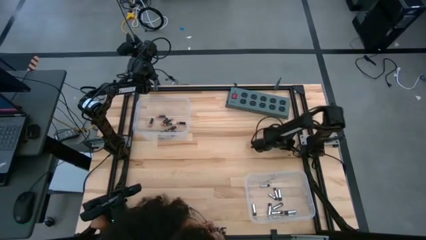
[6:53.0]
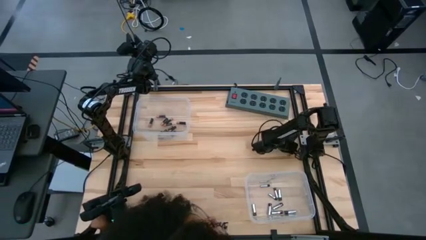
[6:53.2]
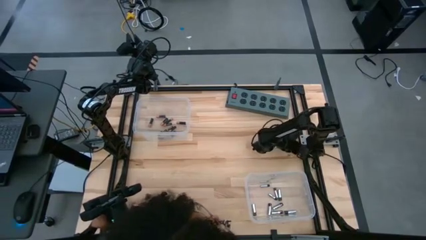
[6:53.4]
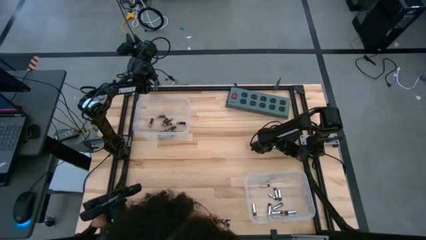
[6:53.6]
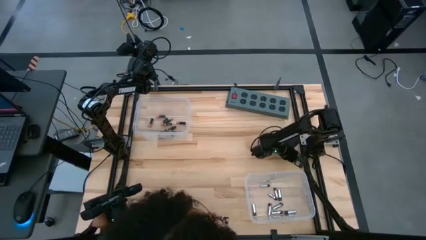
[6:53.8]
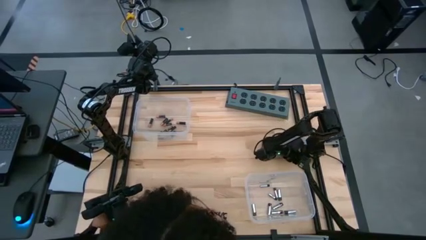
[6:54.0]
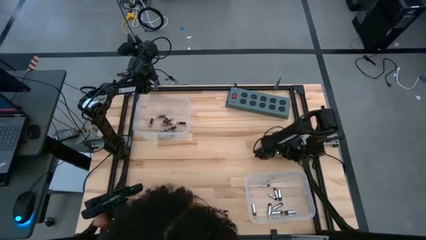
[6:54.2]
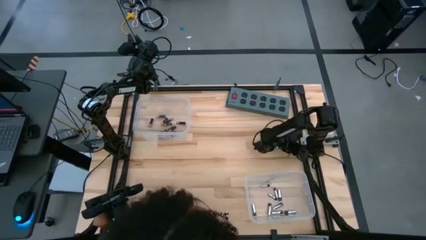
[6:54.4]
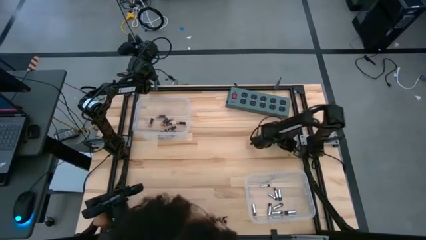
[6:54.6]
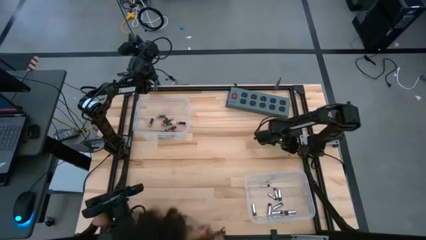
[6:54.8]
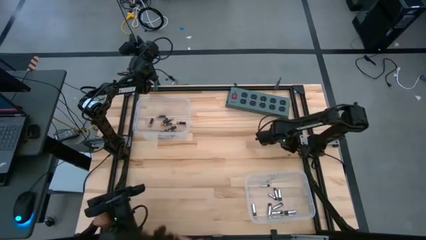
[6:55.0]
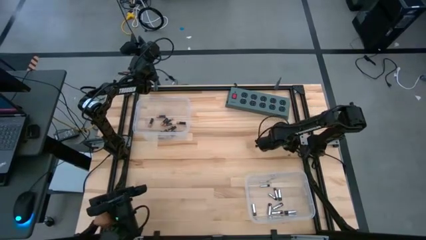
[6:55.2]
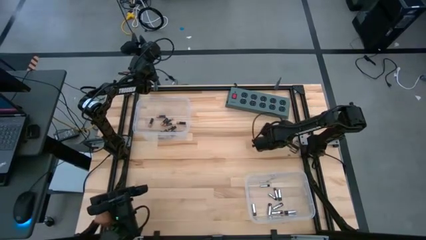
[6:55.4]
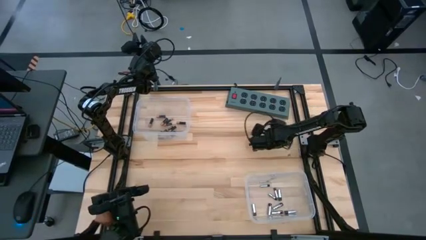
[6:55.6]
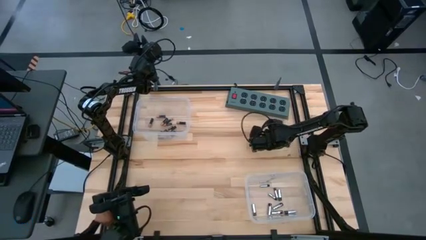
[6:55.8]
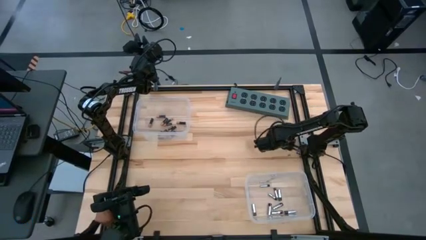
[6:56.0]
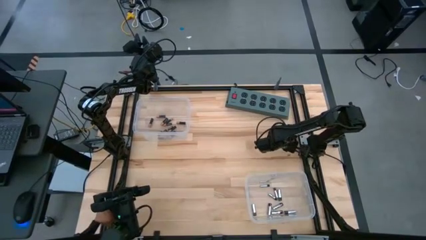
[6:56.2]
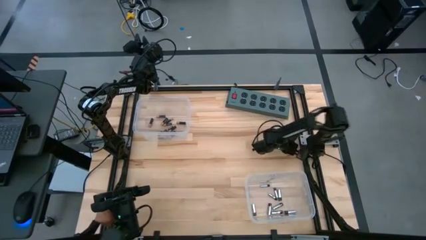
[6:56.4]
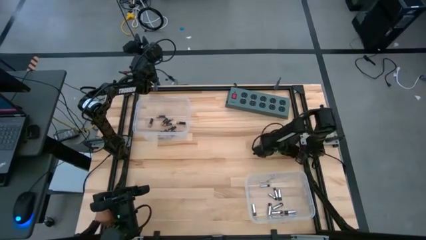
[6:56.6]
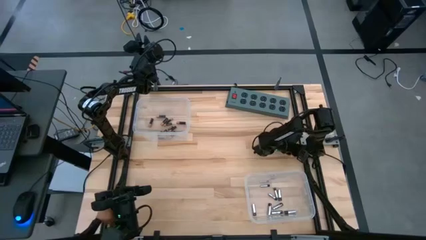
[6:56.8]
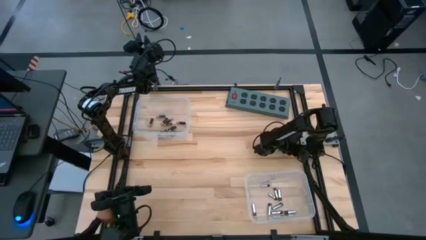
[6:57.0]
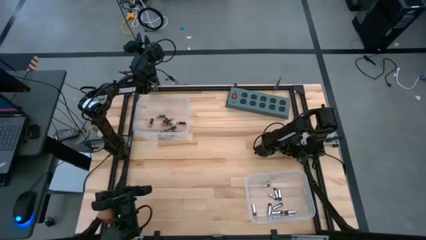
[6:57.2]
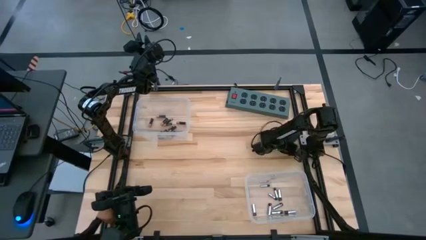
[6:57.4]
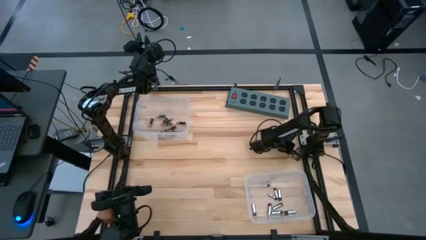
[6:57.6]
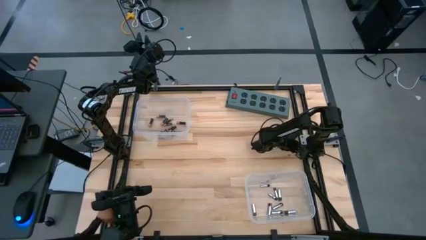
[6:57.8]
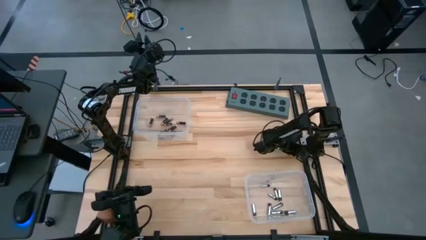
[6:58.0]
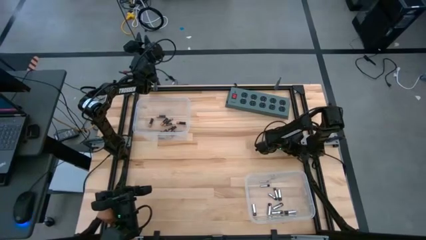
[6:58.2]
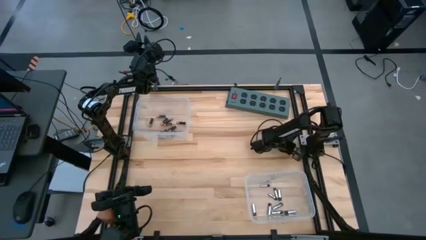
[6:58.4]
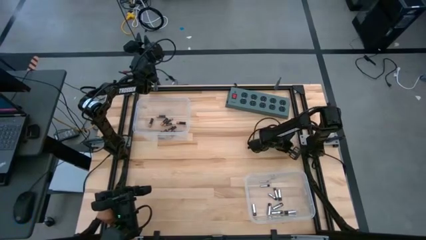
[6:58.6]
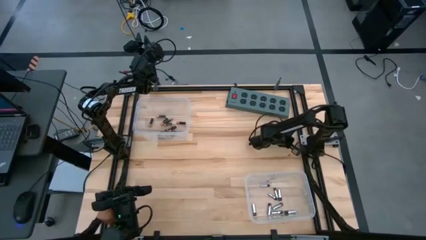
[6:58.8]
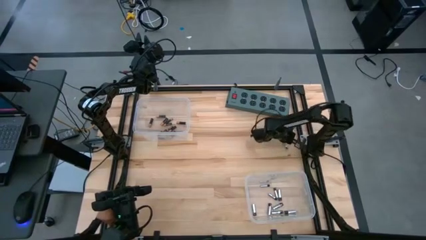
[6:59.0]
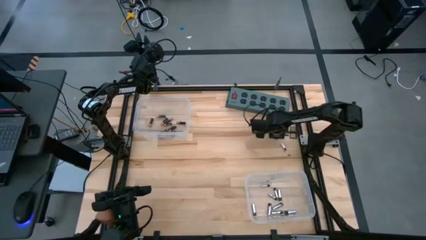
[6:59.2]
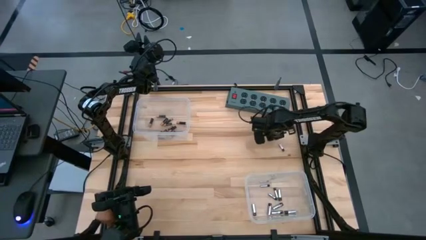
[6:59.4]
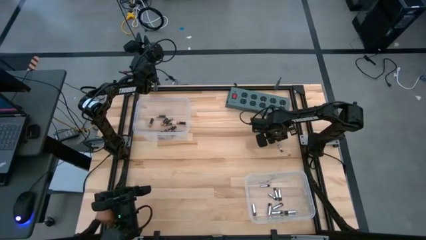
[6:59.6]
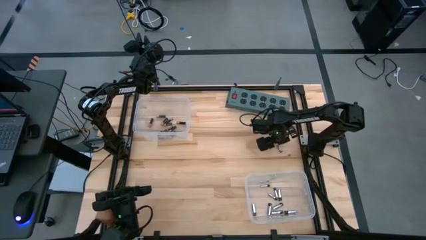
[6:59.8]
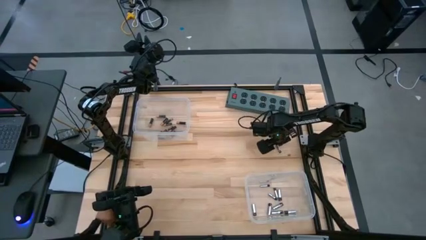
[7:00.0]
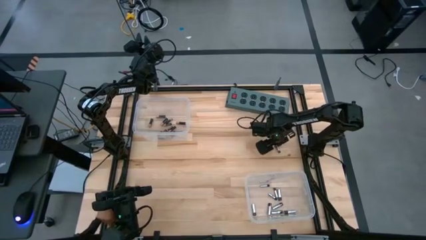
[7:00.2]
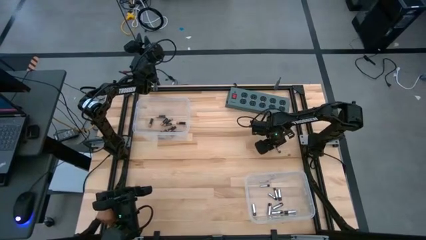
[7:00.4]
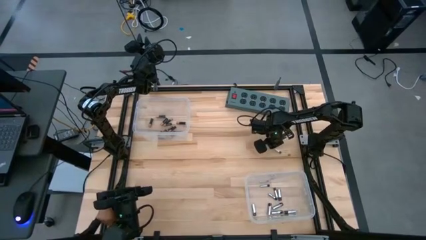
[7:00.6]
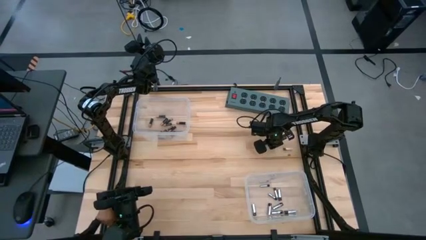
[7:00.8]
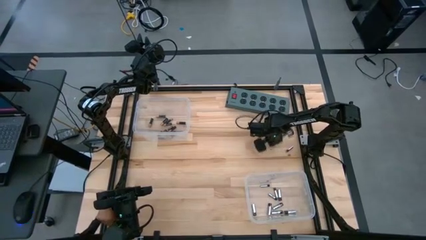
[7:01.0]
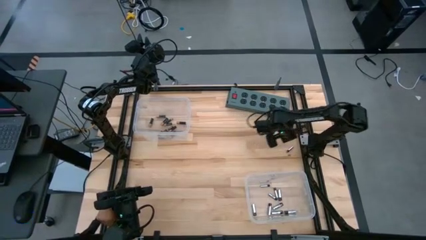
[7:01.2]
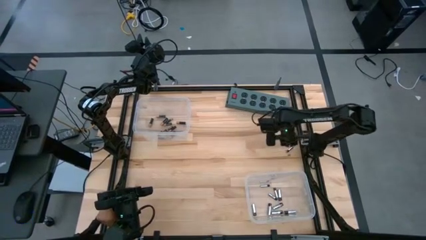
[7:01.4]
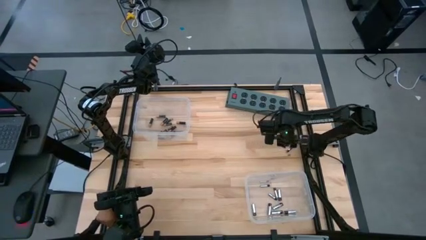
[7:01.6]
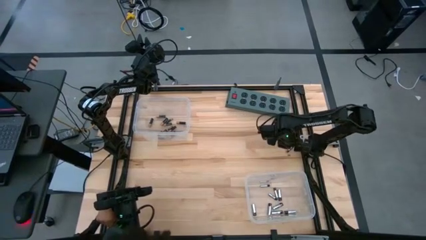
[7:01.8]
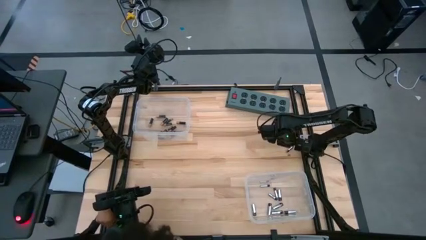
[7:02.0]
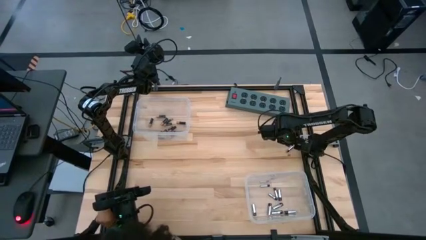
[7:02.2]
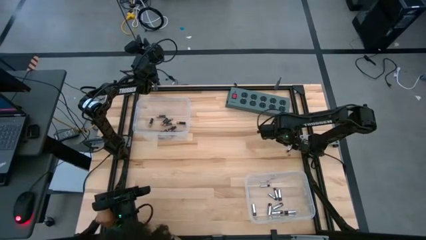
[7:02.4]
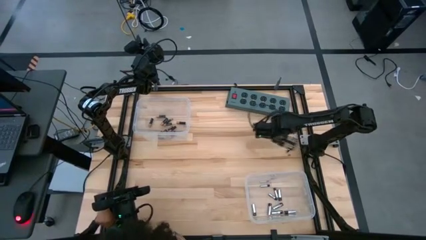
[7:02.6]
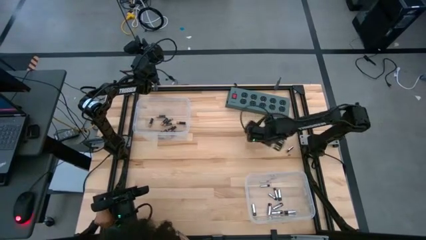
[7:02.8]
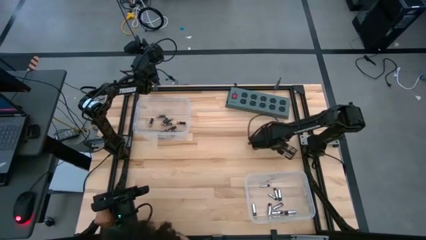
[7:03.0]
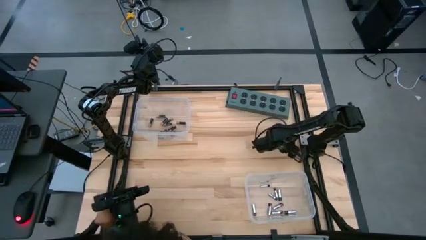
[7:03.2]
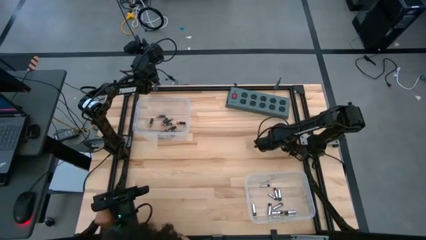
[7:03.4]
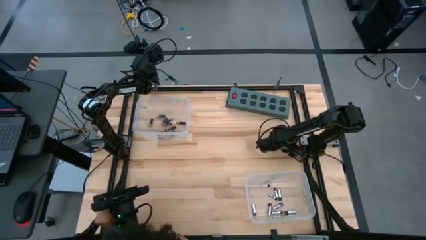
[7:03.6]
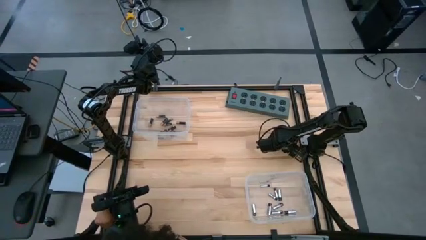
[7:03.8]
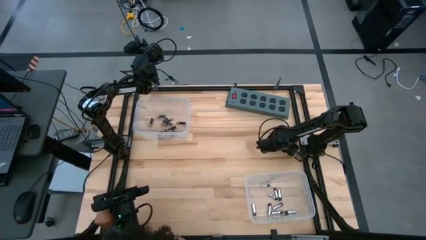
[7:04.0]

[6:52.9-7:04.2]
Task: Sort batteries
Put the silver battery into the bottom transparent bin

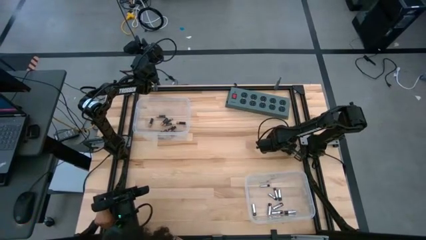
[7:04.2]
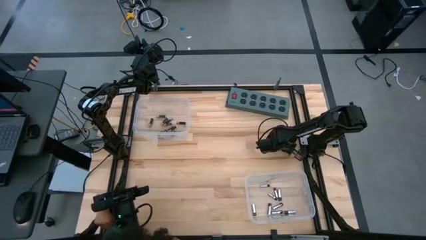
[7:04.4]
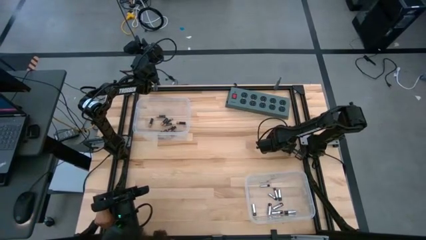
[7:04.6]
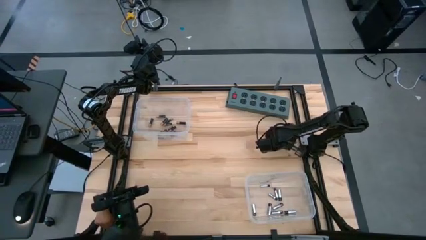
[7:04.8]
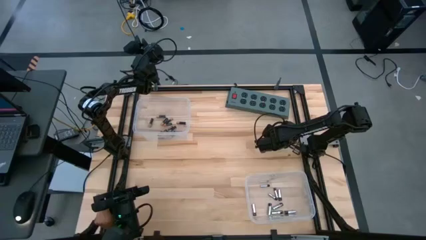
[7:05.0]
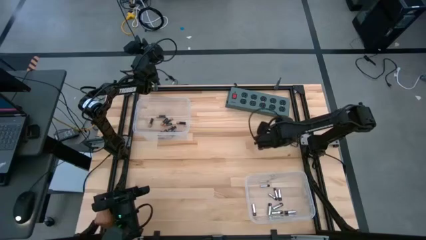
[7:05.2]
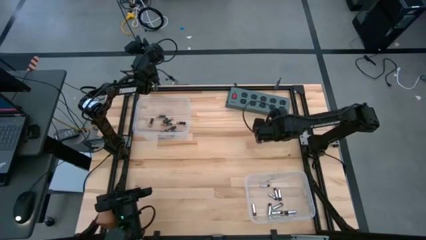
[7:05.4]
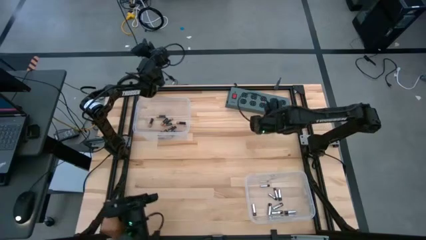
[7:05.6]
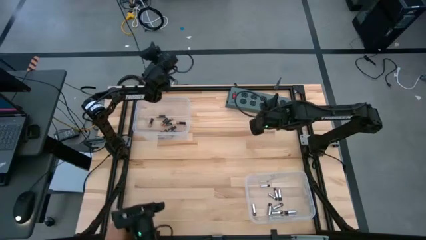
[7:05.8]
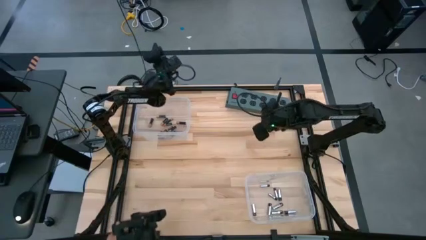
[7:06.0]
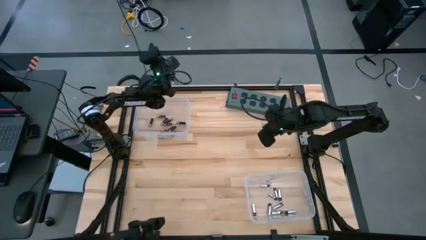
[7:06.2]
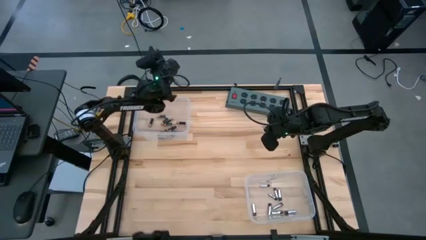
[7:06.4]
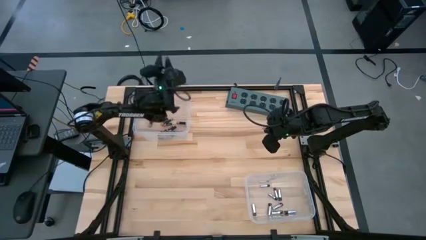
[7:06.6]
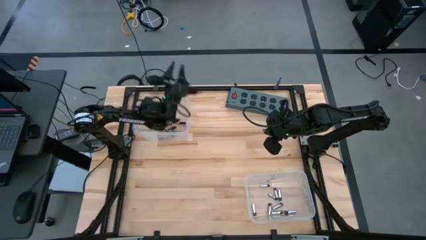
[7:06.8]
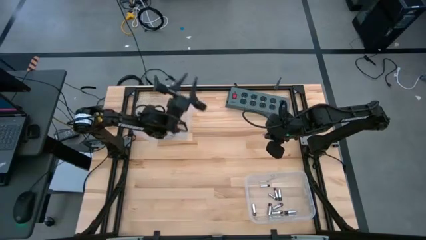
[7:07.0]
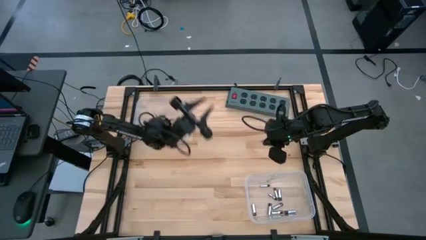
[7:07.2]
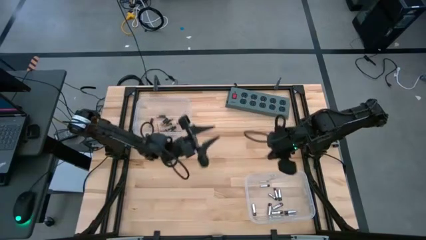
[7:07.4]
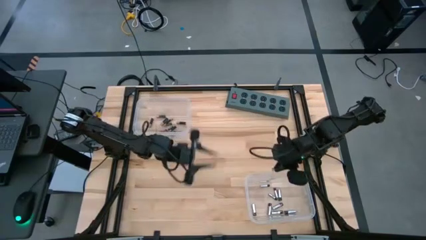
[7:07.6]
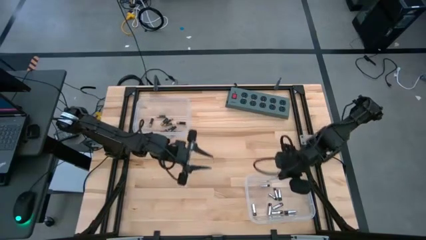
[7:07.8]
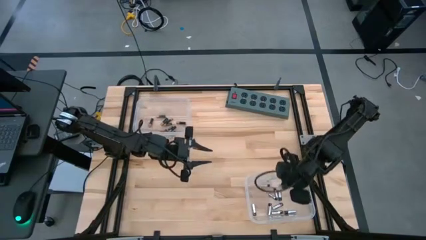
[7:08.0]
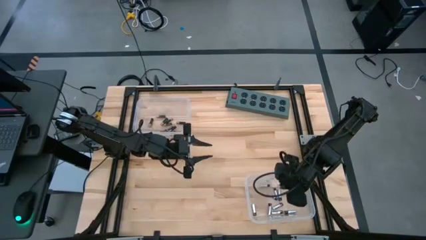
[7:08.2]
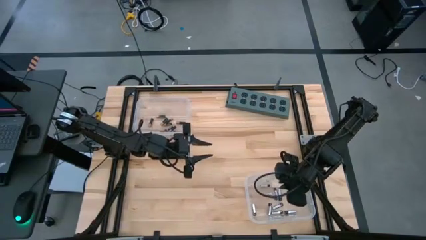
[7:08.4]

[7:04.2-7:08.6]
Put the silver battery into the bottom transparent bin
